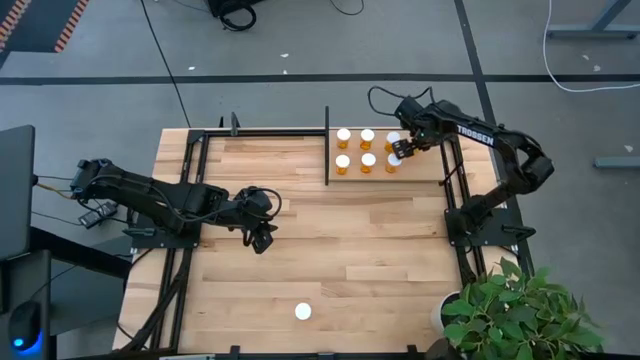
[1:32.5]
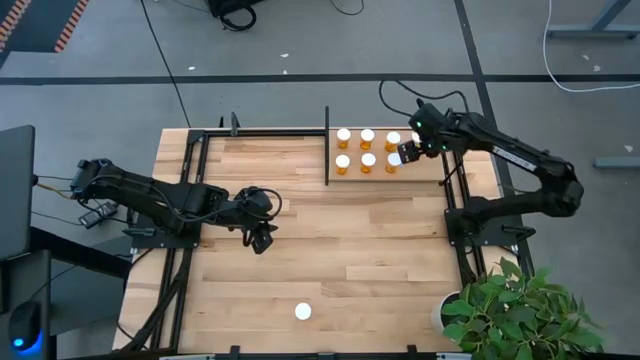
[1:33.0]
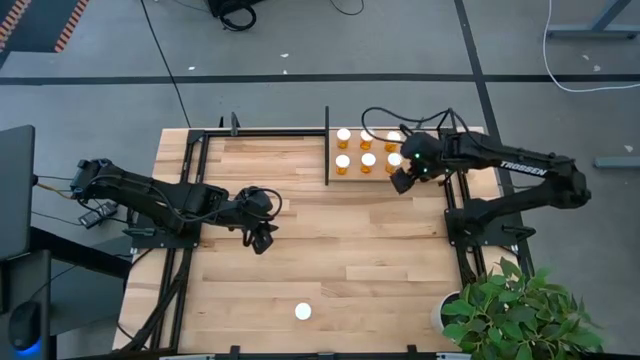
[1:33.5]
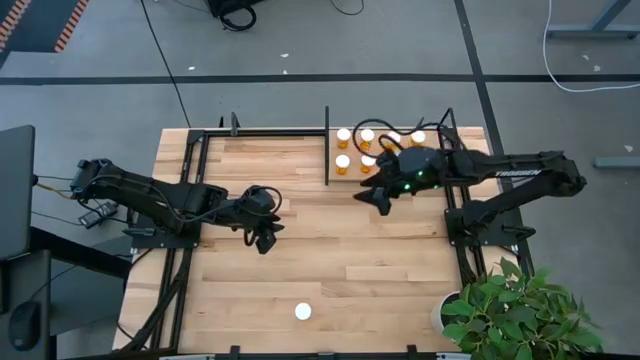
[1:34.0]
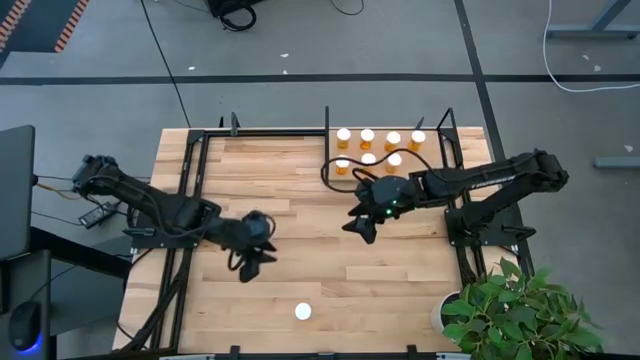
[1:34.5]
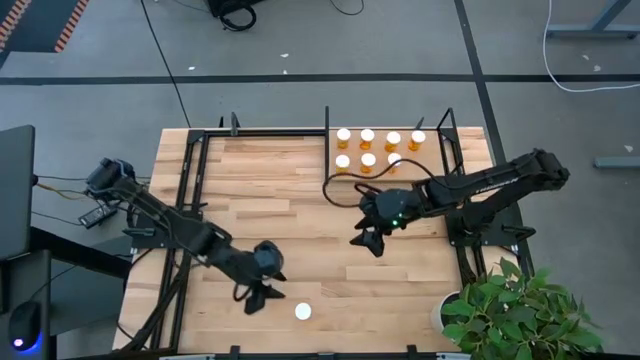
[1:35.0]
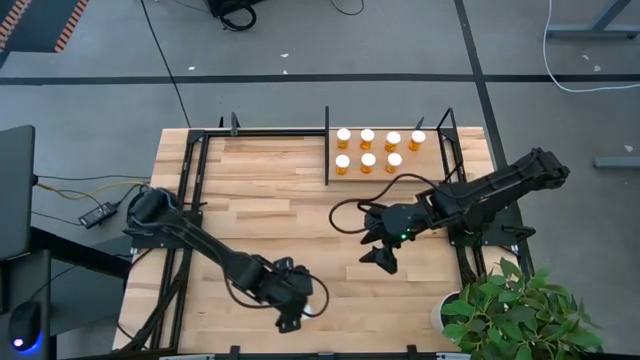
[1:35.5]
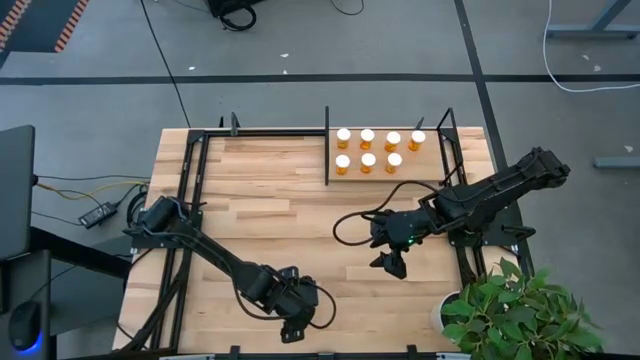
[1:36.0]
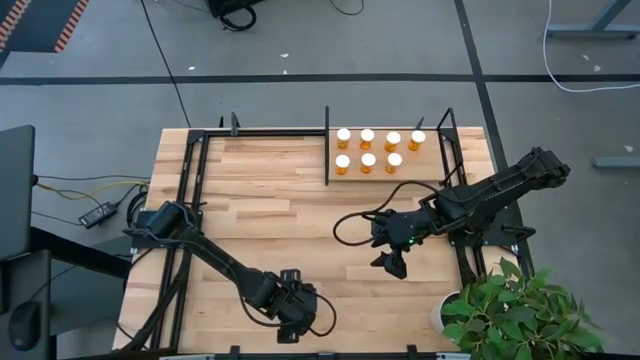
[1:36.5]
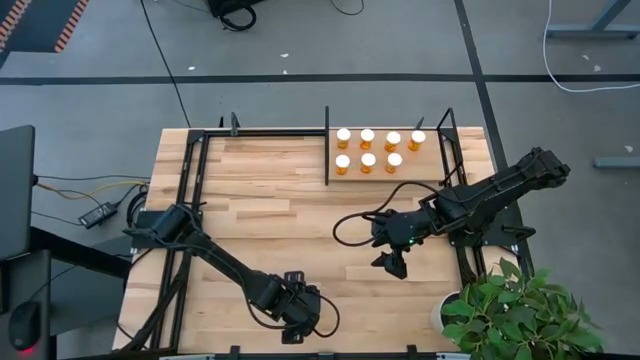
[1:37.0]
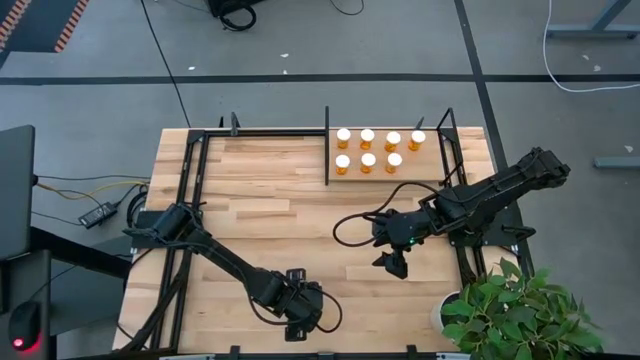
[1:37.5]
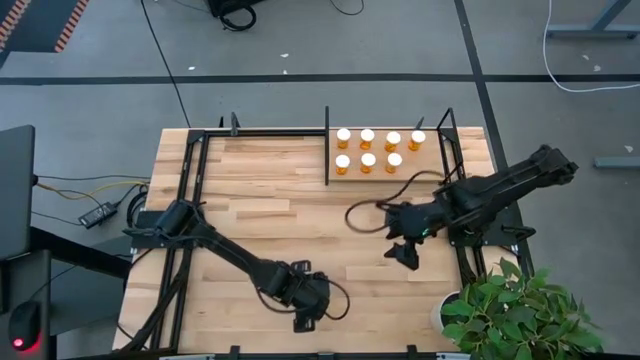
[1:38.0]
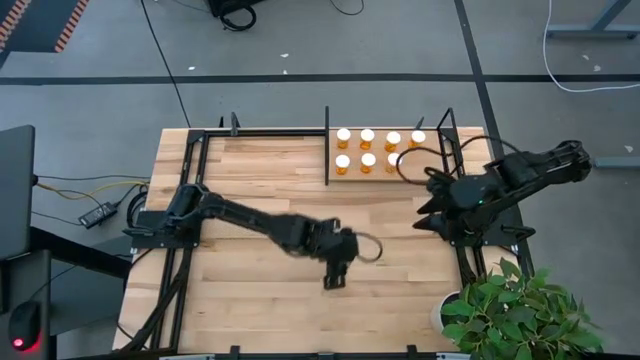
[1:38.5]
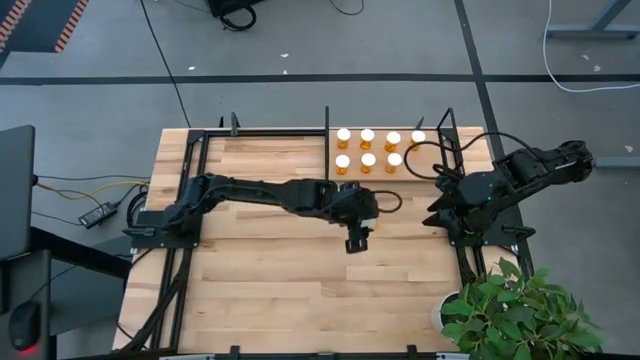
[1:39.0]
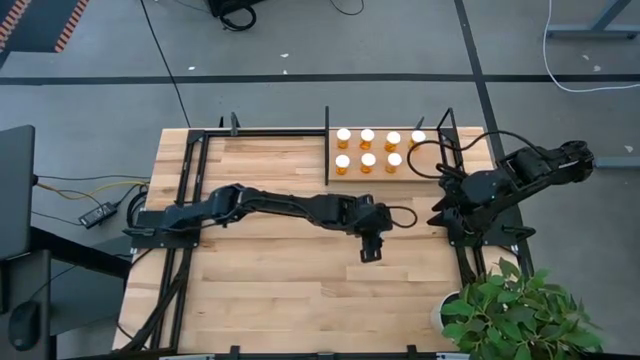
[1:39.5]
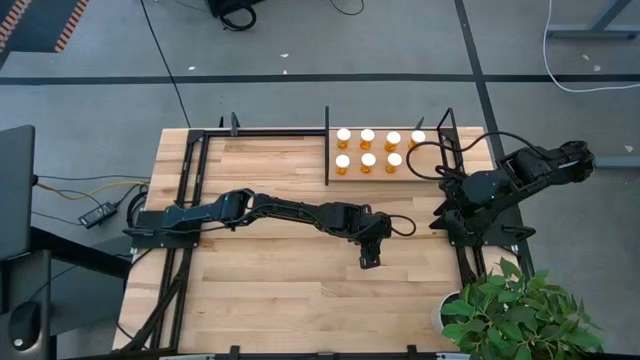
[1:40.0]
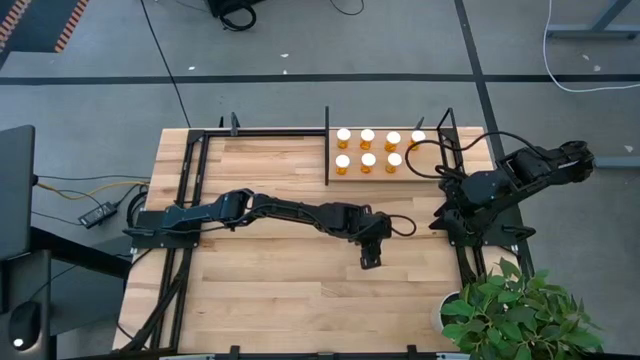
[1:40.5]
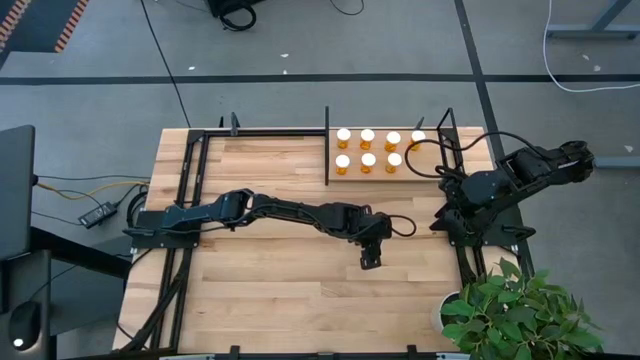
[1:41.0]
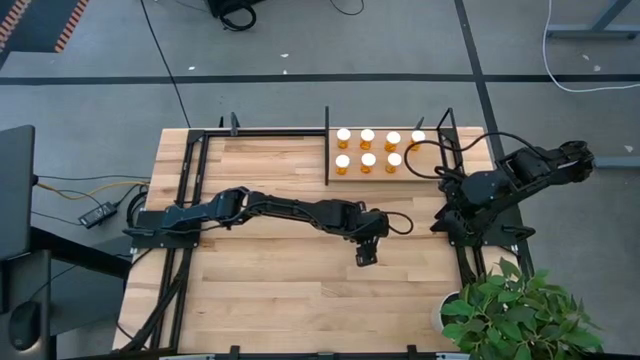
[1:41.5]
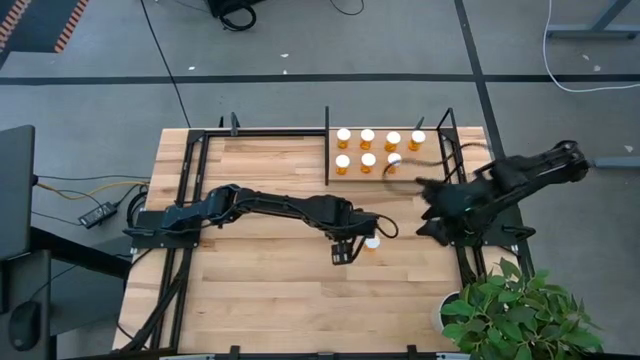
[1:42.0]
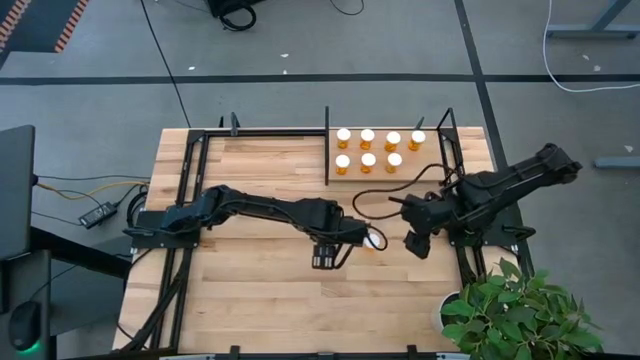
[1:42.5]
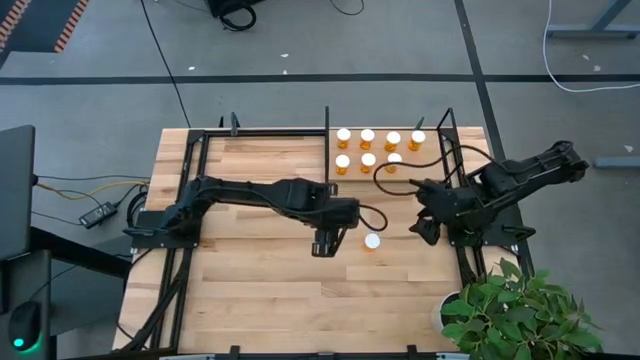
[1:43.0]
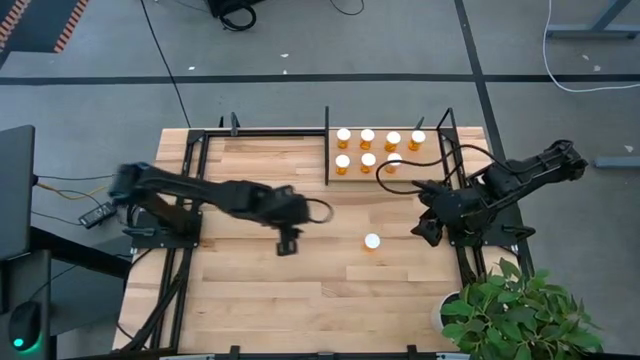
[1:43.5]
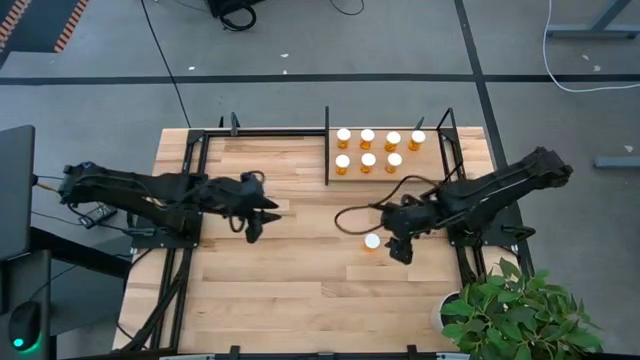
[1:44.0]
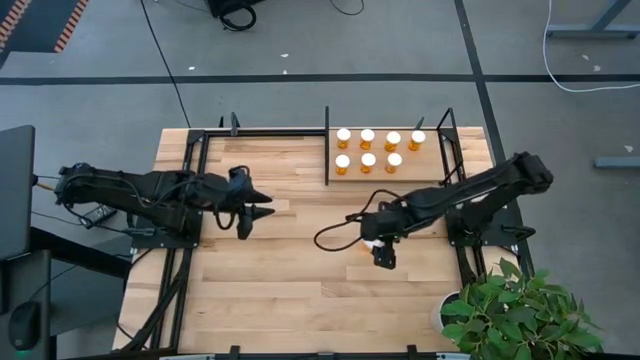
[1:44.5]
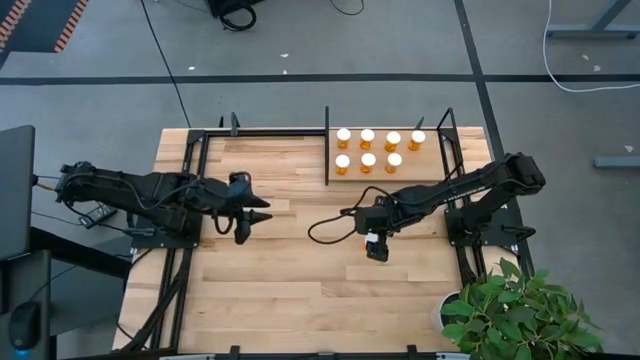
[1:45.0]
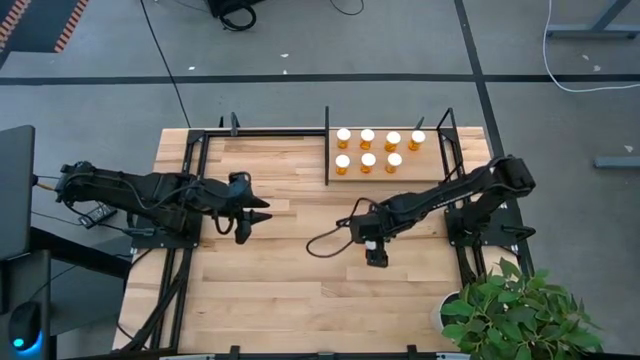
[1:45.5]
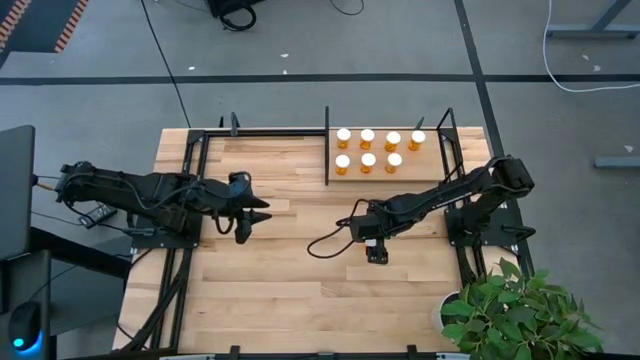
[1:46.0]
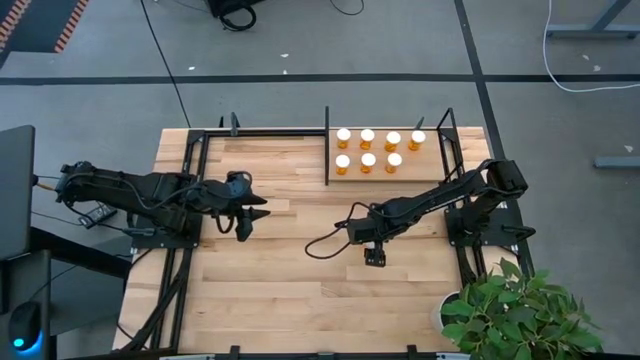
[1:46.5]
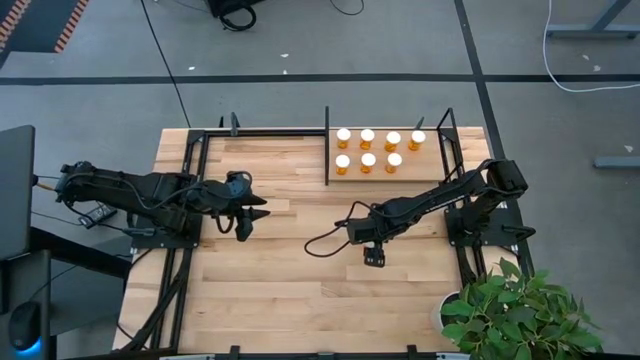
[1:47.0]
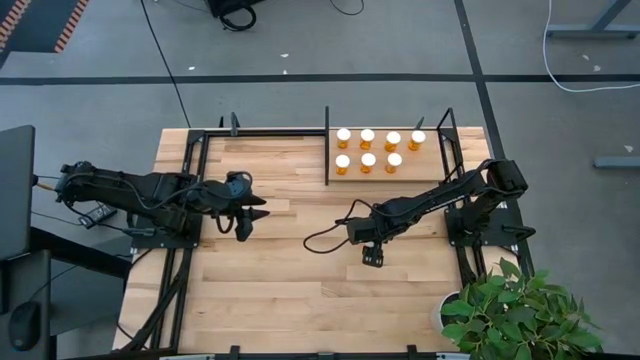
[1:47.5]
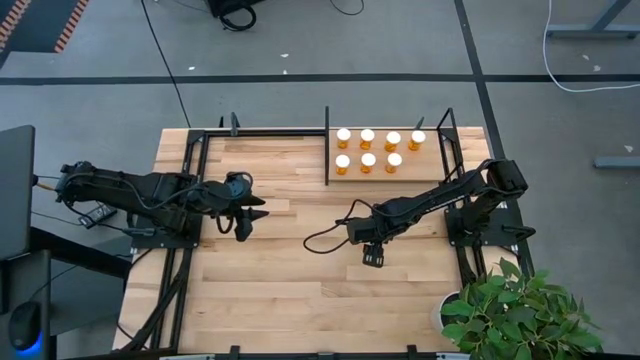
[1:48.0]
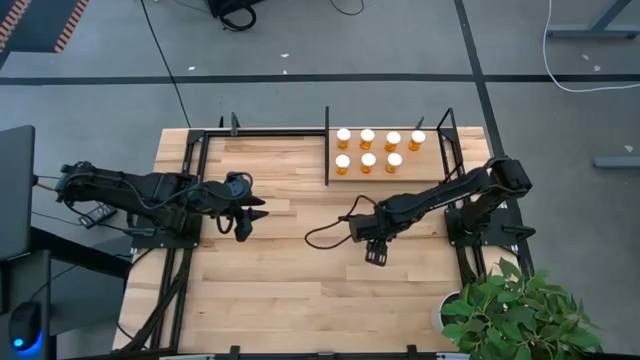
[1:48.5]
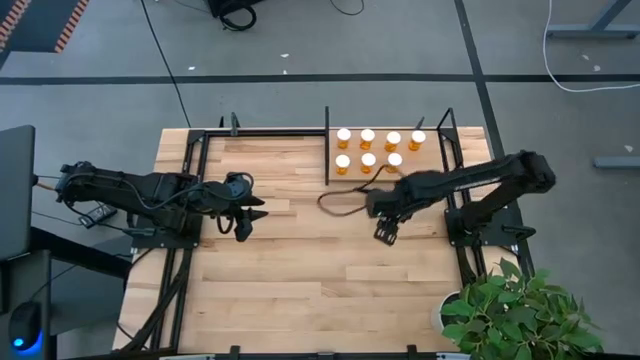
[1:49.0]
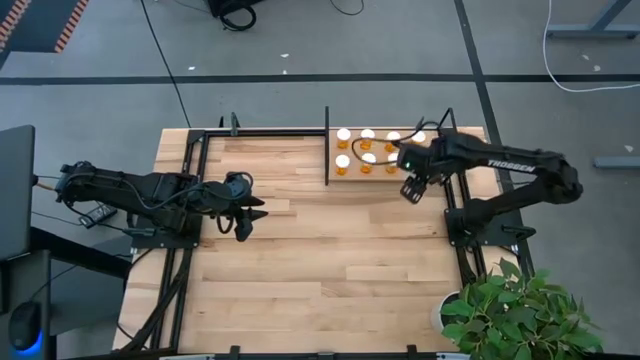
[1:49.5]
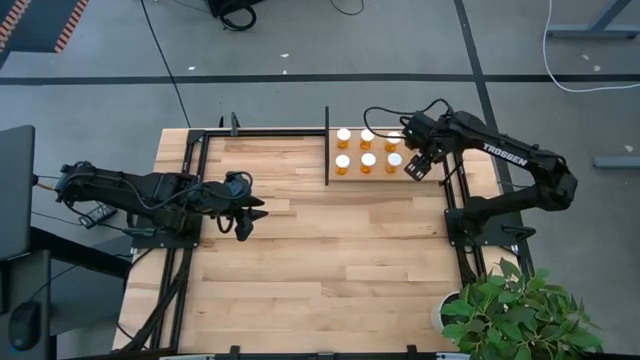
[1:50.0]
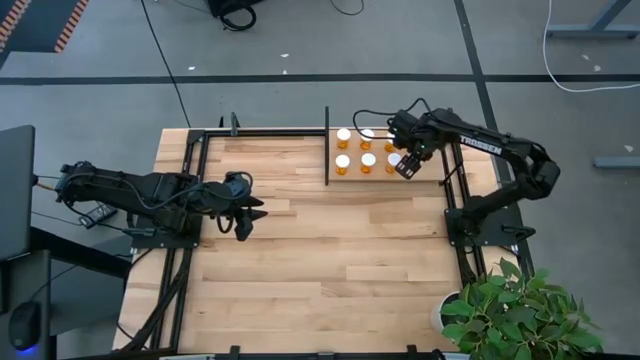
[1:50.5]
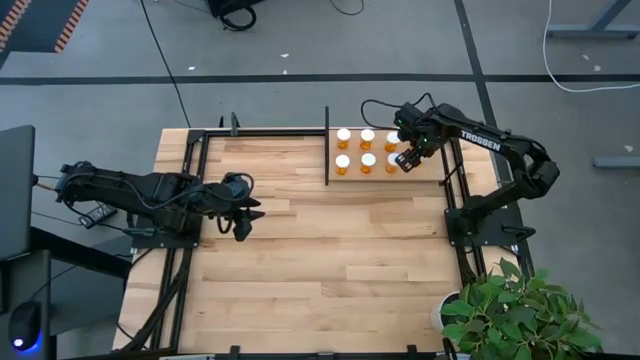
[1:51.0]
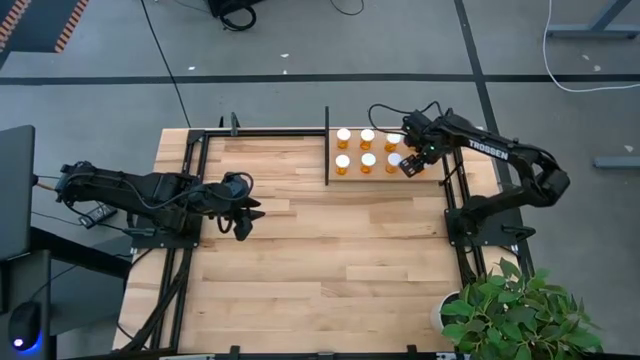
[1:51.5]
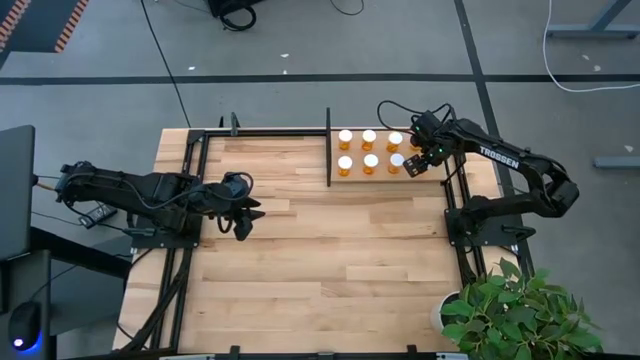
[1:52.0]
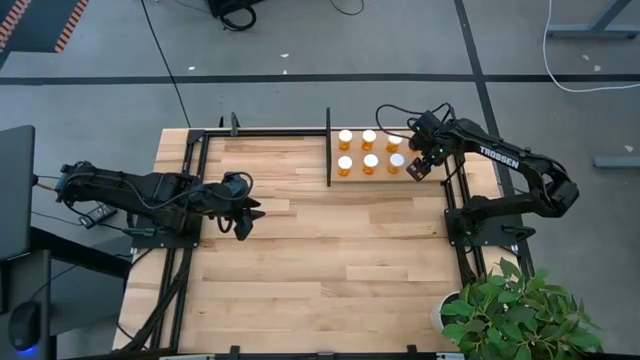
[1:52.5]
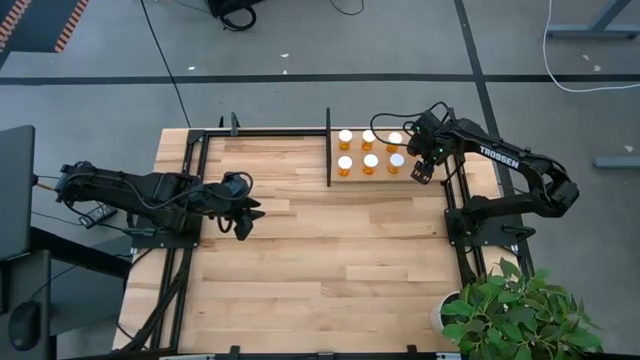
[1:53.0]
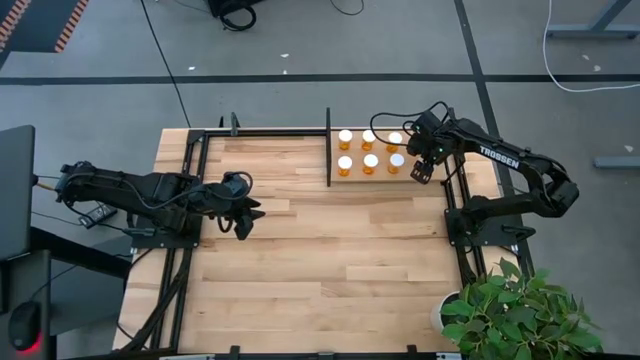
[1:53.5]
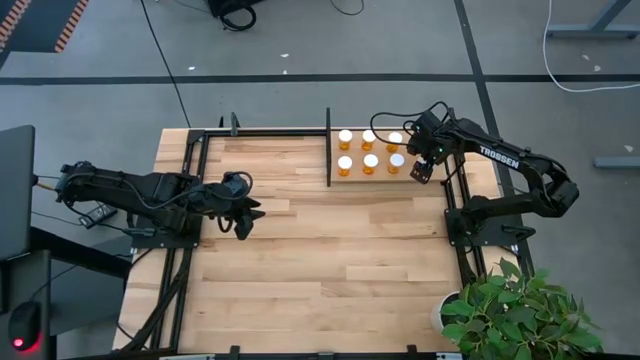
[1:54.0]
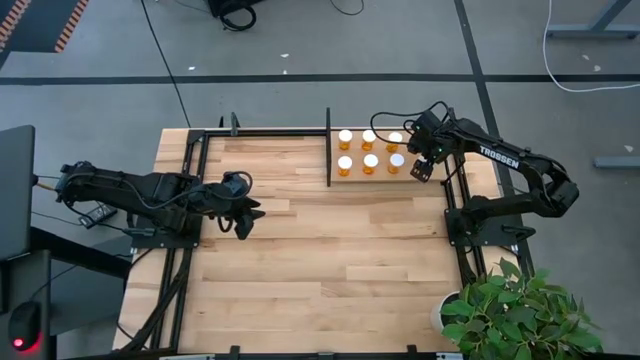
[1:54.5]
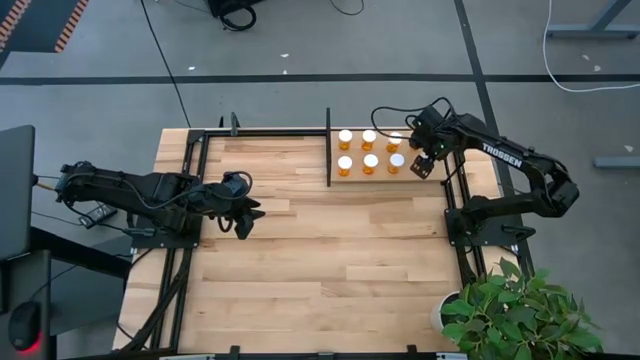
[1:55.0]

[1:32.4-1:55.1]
Task: Pick and place medicine bottles onto shelf by color
Put the orange pill bottle on the shelf
